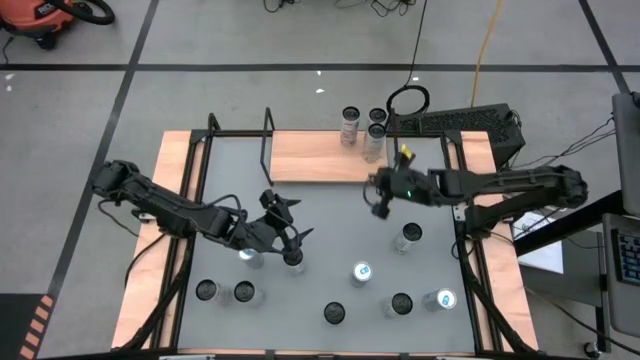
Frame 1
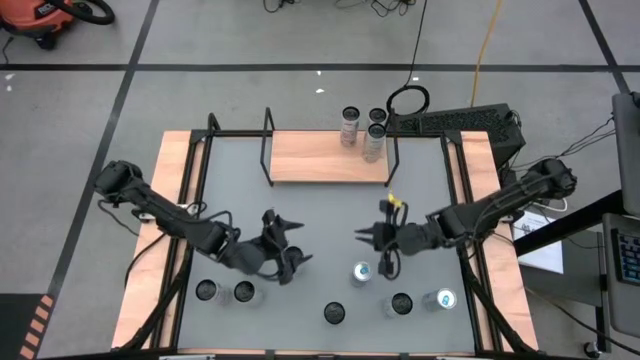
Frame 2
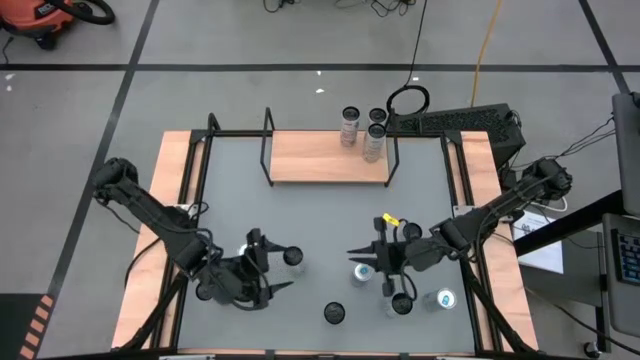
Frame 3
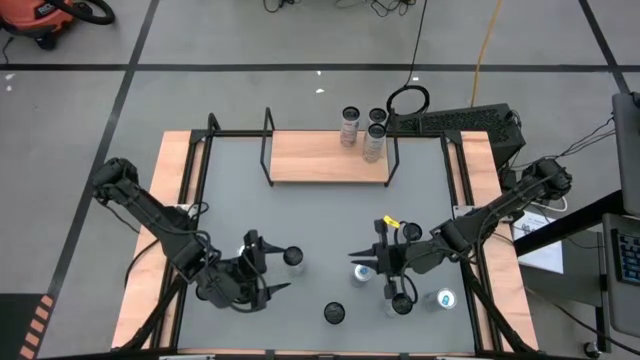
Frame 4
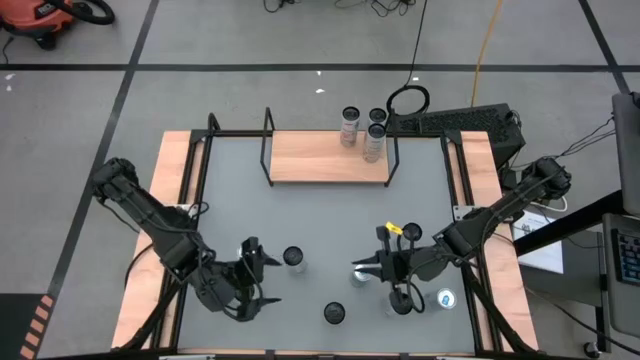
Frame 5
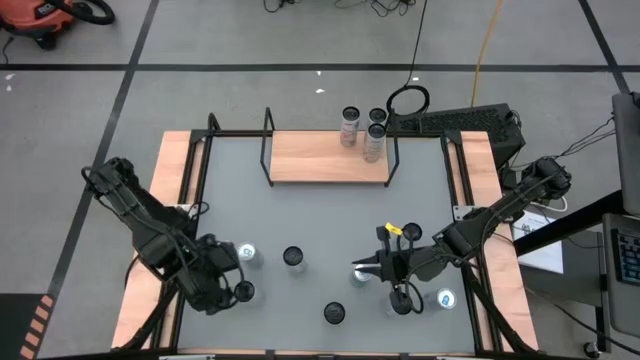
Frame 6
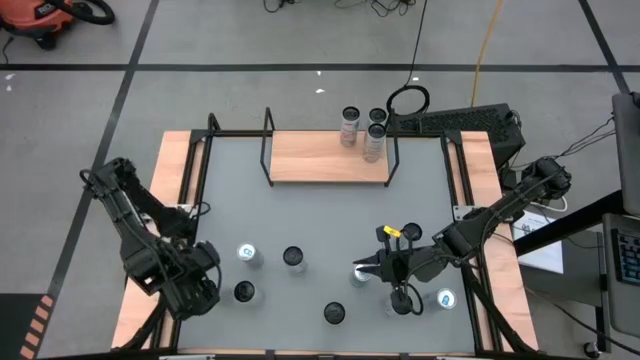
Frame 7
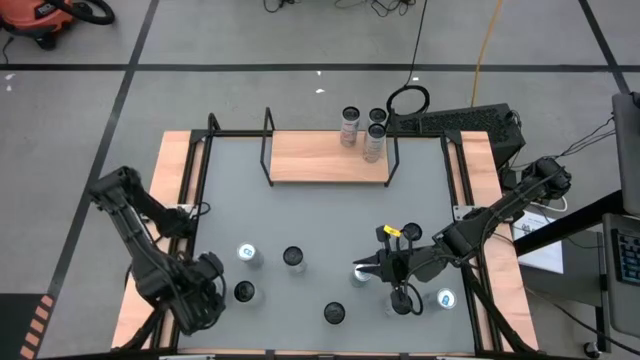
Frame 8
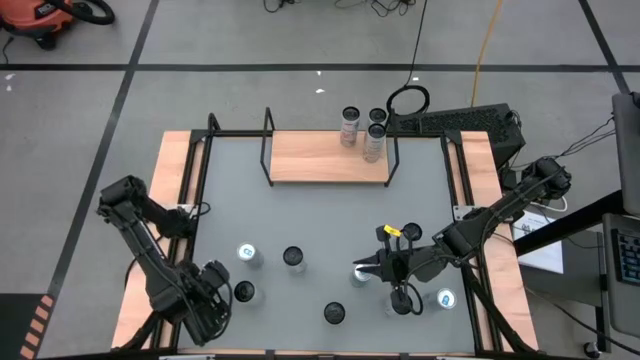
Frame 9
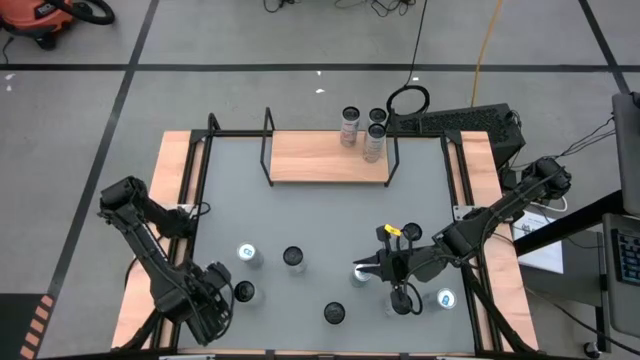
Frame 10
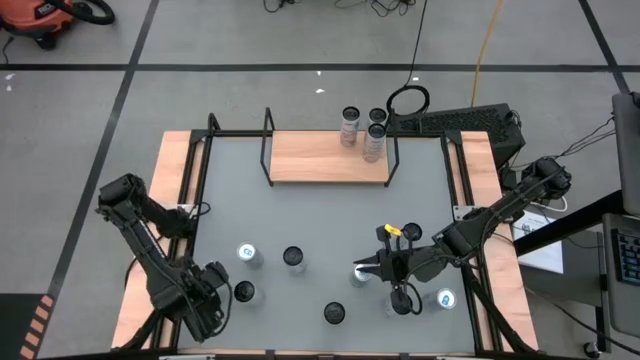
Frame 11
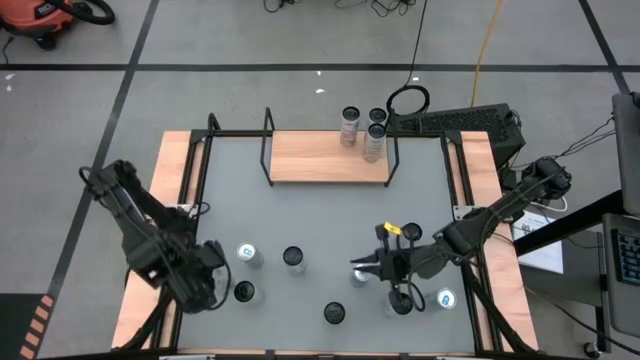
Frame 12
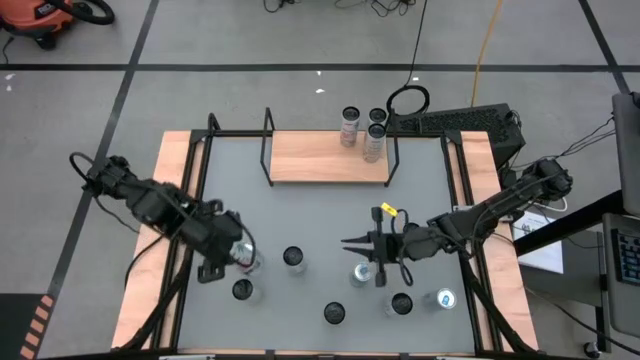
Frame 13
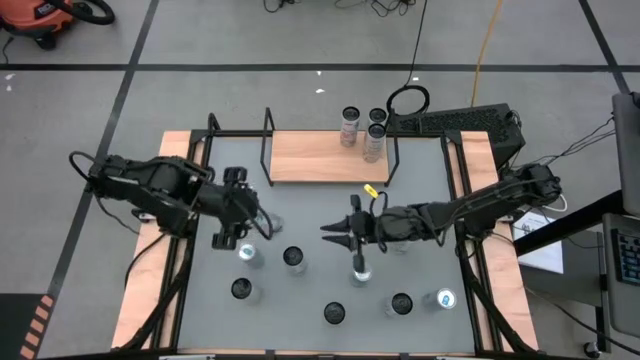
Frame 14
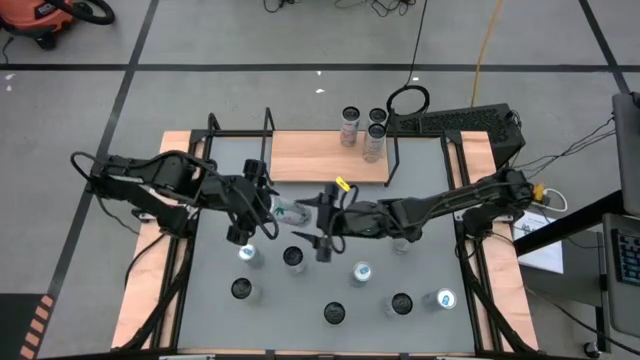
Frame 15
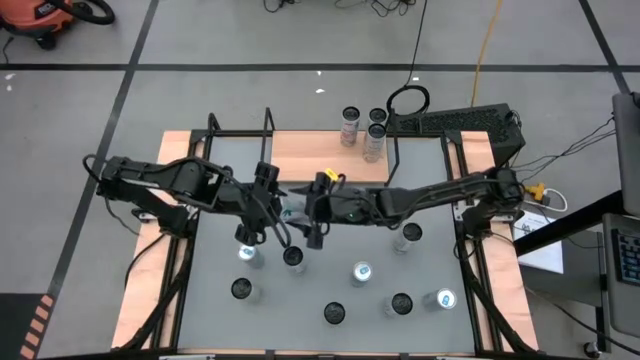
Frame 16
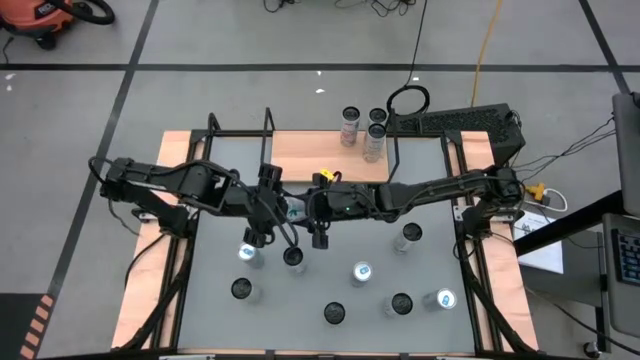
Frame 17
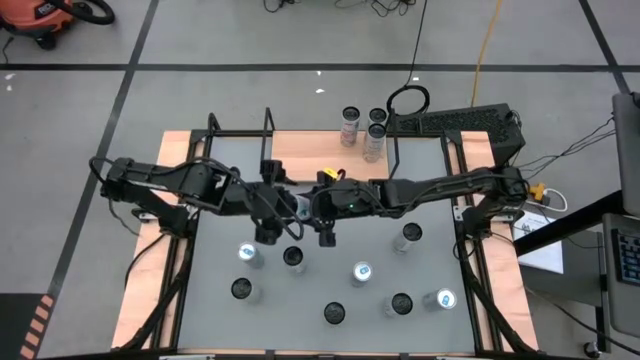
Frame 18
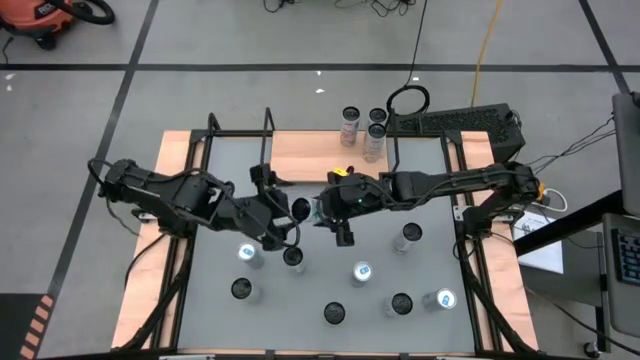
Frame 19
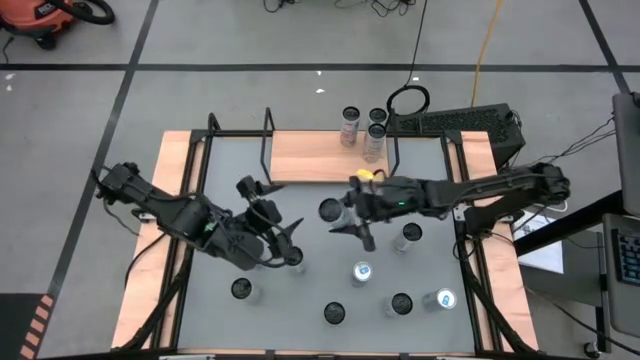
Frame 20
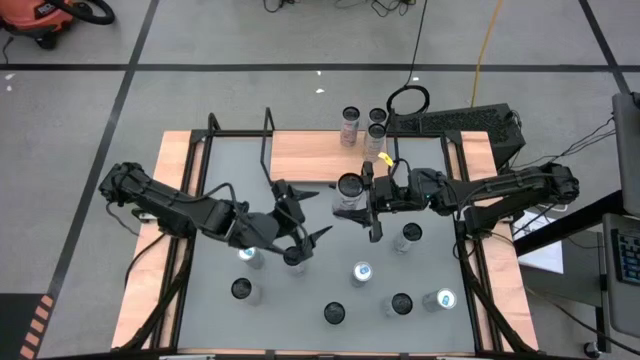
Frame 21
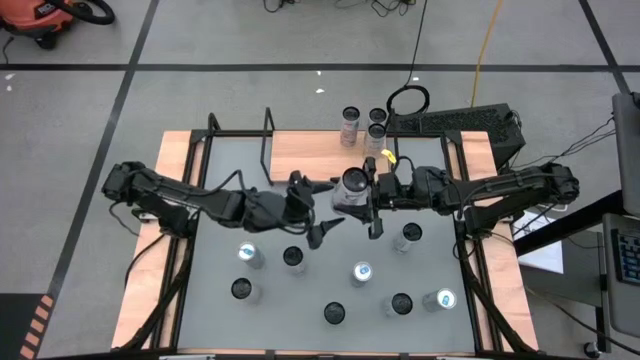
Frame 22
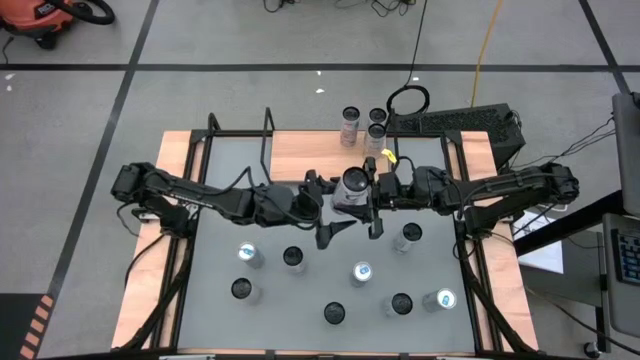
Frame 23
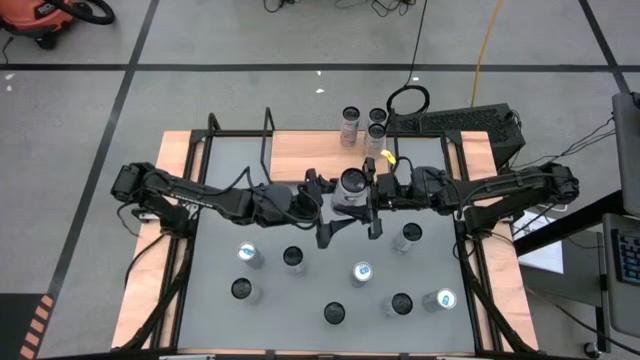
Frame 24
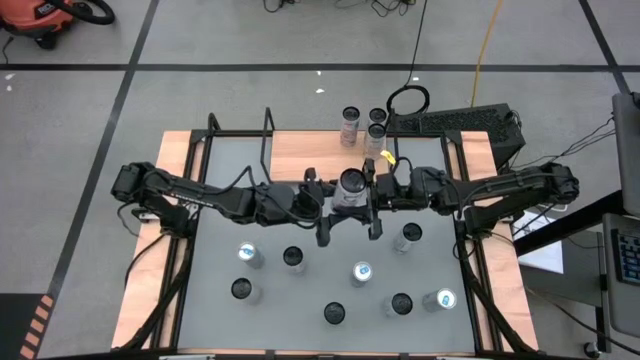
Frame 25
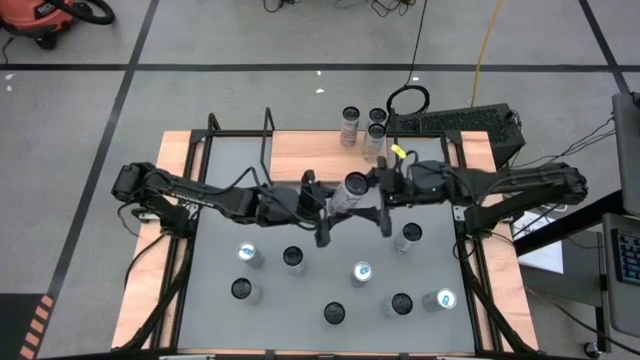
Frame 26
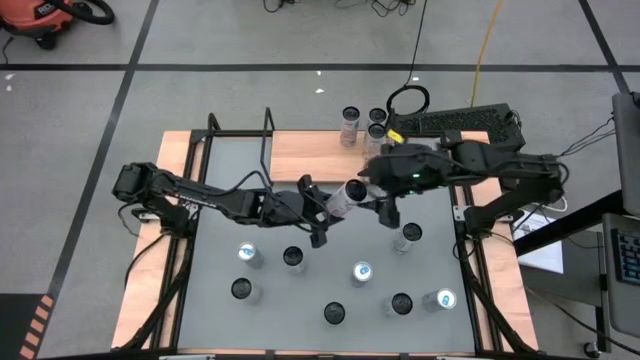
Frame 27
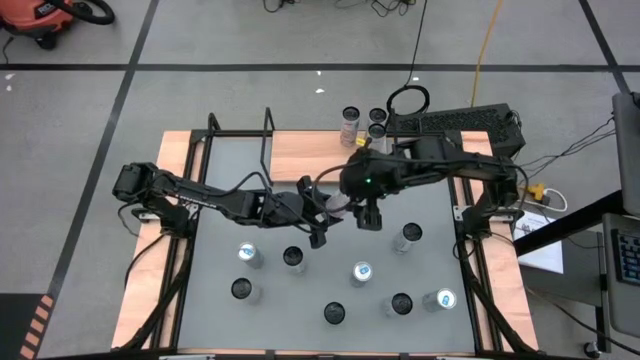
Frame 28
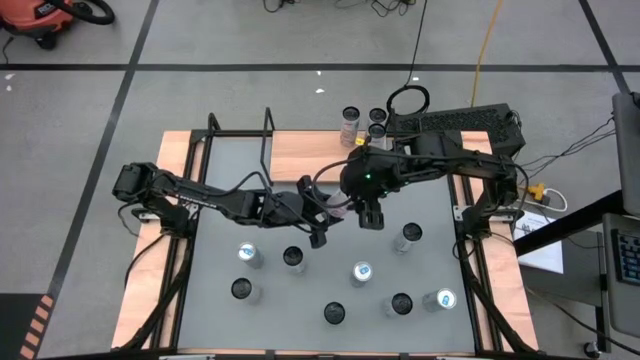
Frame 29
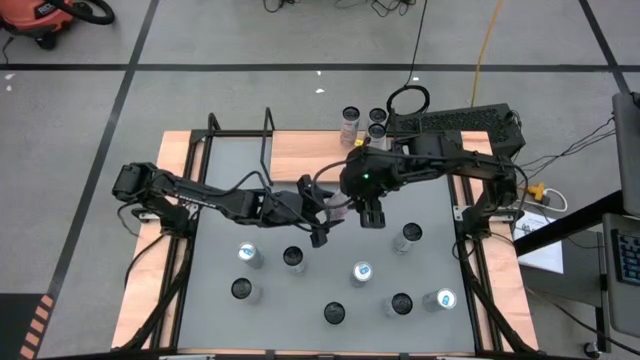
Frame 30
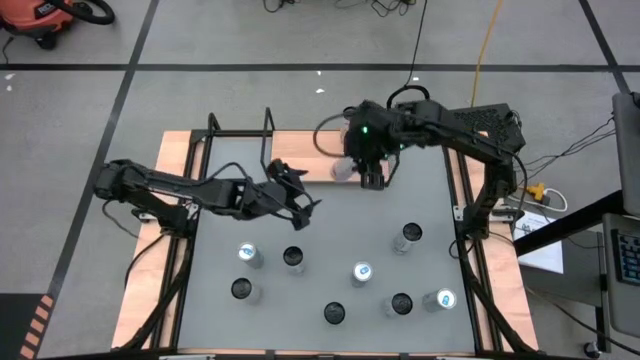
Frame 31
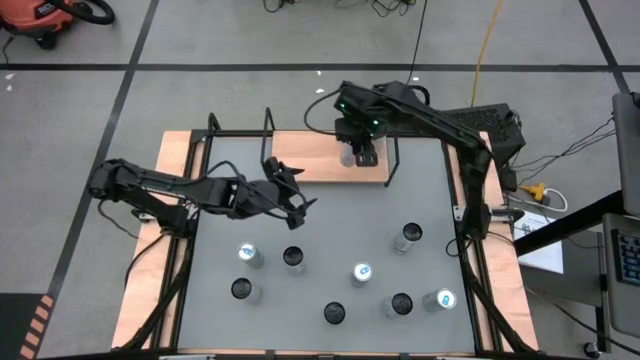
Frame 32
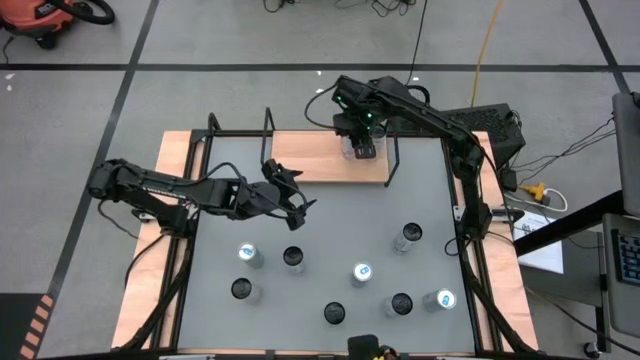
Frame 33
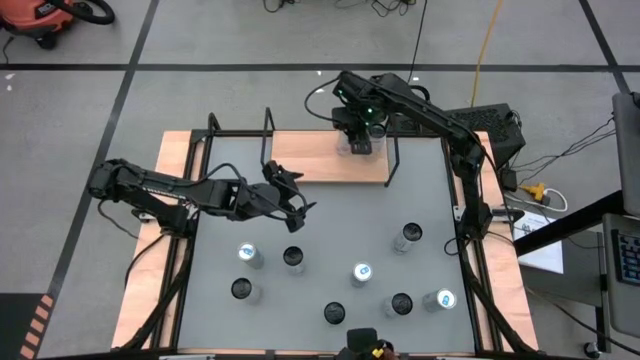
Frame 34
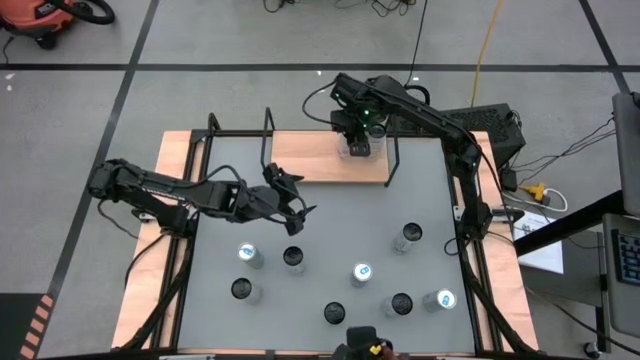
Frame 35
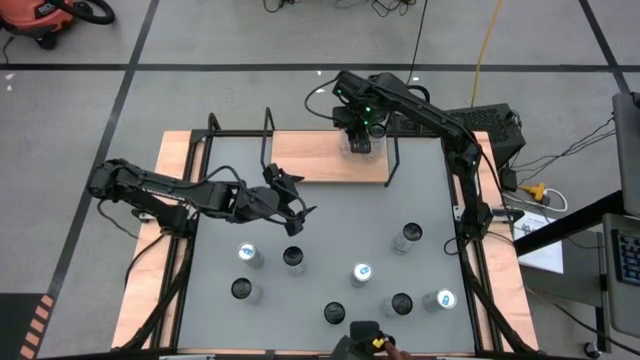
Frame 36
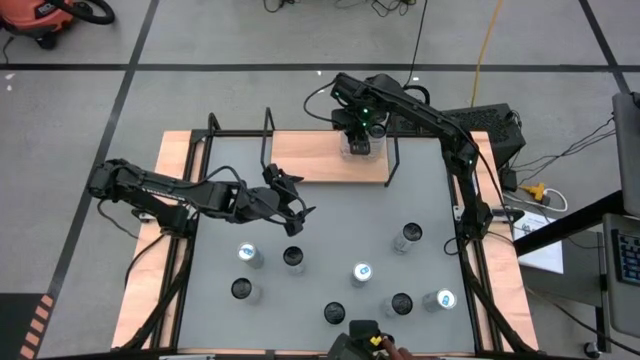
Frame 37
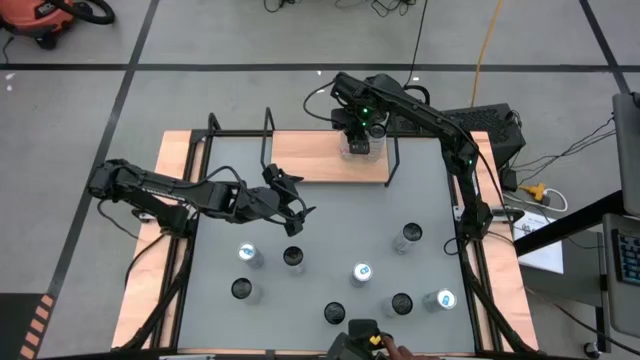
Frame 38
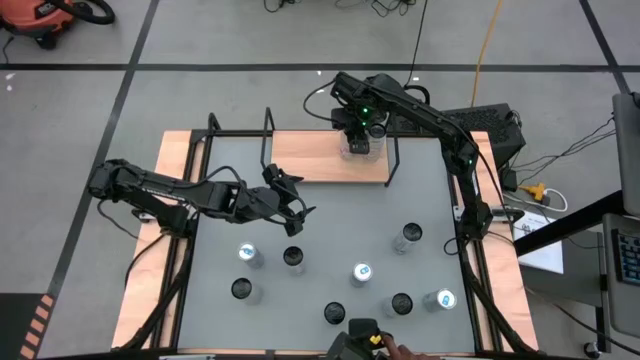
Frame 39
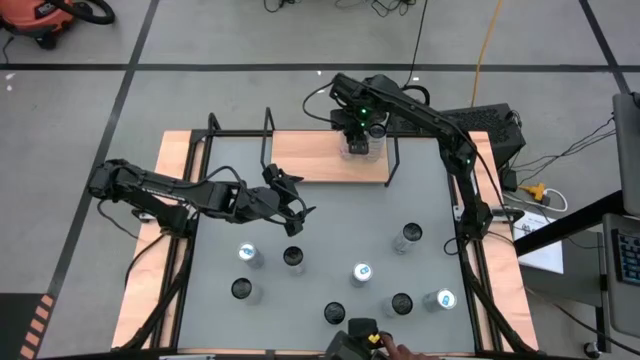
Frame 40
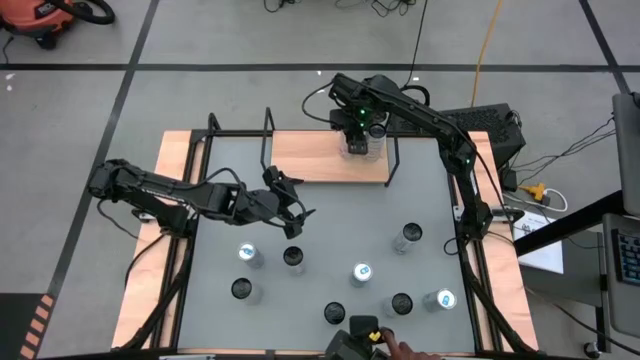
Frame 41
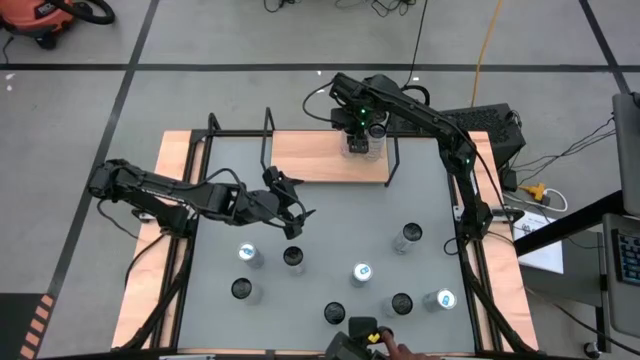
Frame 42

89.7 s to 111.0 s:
Task: Place canned beverage on shelf
Put the left white pink soda can on the shelf aligned with the white pink soda can

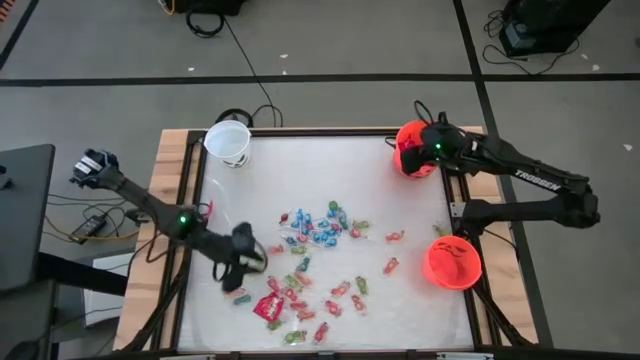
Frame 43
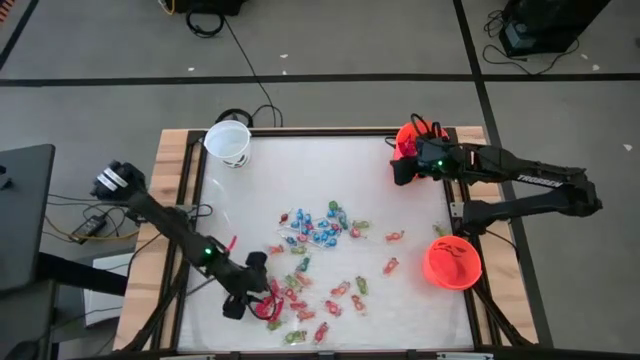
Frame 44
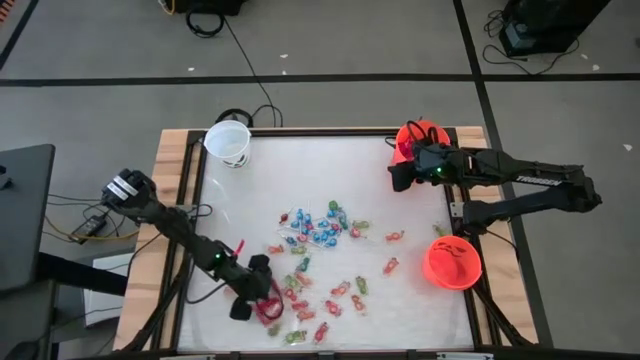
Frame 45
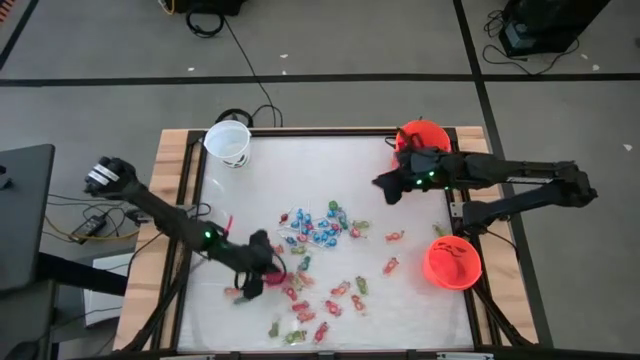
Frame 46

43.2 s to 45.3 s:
Task: Sort candy by brand, put in halloween buckets
Put the red candy into the top orange bucket
